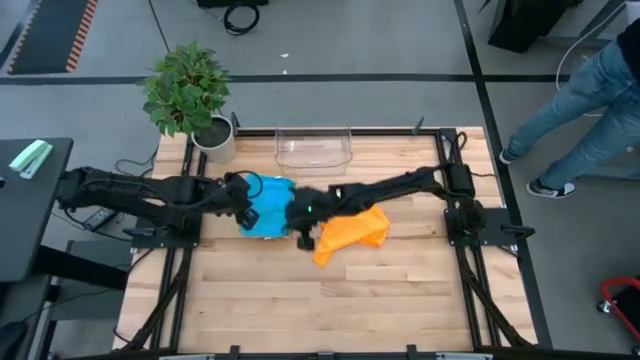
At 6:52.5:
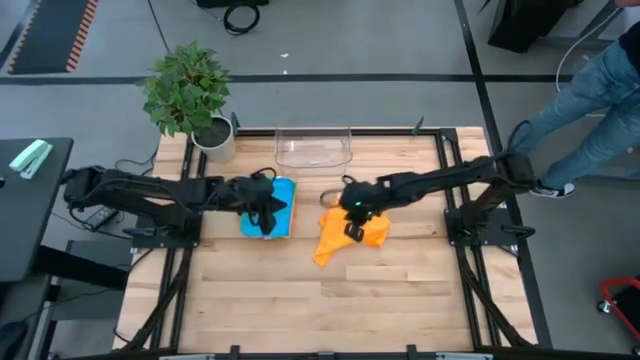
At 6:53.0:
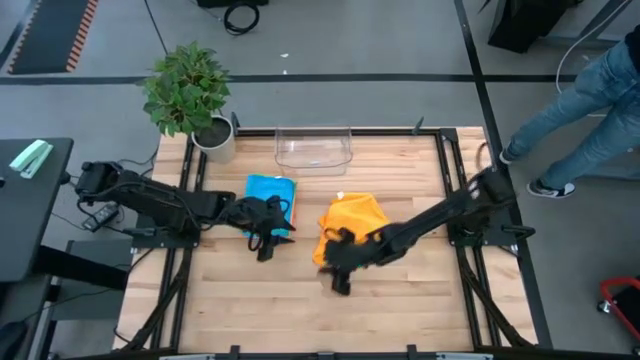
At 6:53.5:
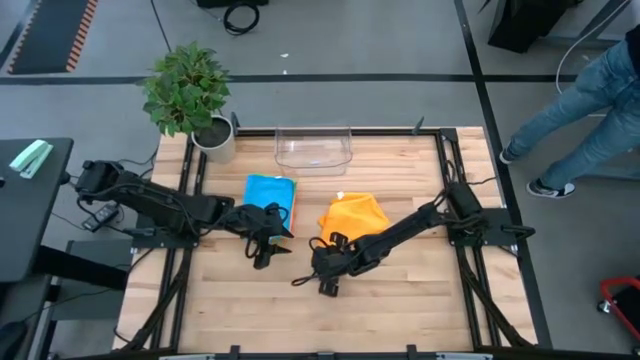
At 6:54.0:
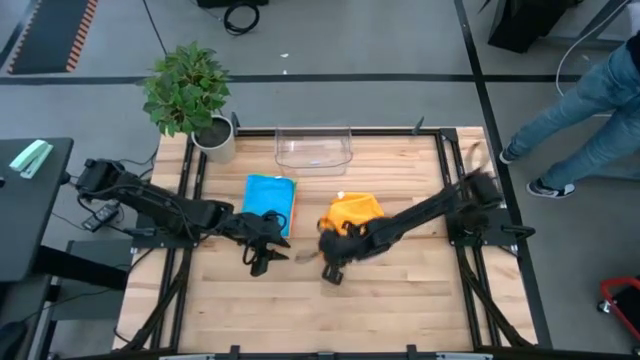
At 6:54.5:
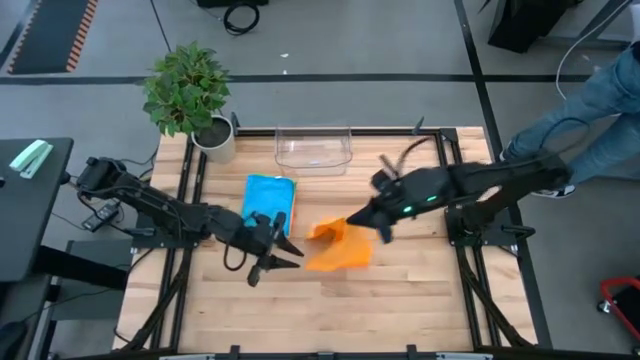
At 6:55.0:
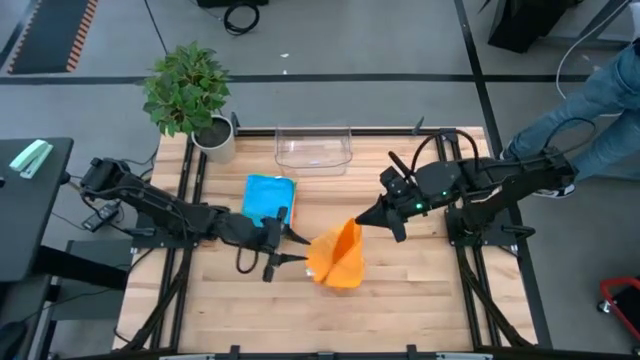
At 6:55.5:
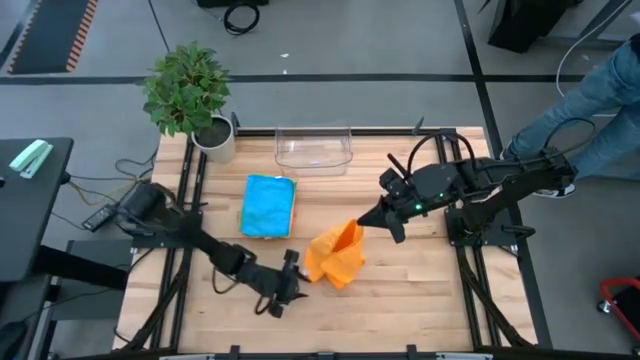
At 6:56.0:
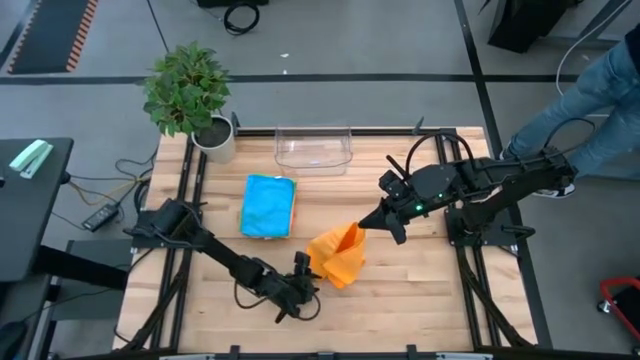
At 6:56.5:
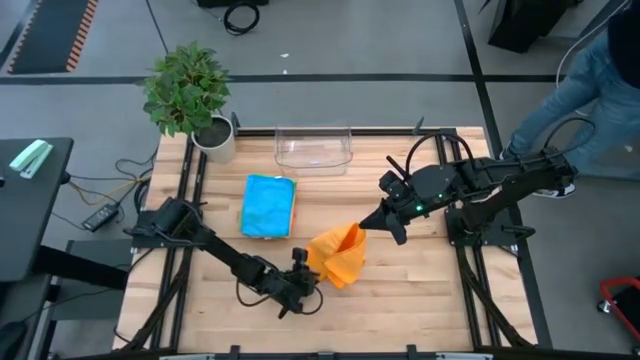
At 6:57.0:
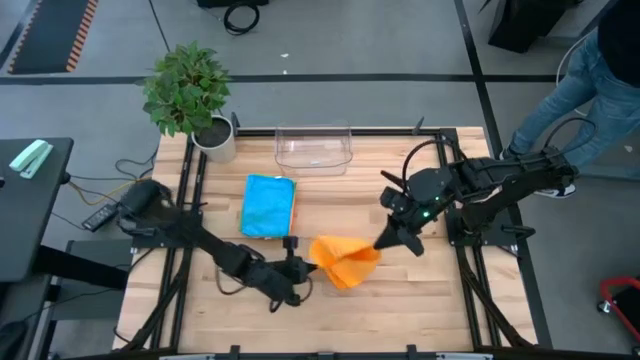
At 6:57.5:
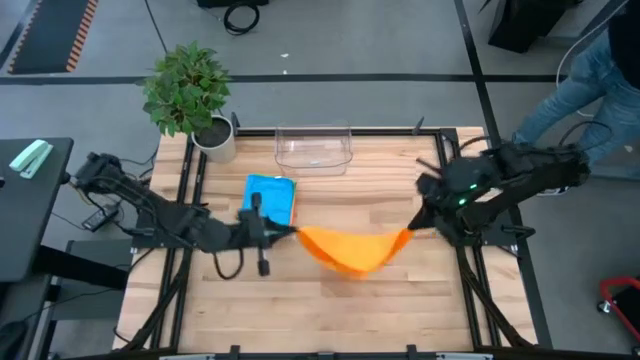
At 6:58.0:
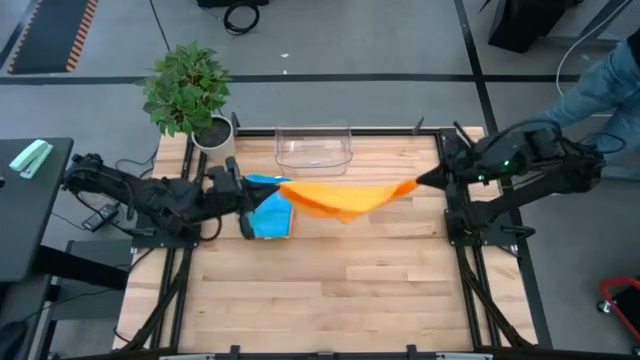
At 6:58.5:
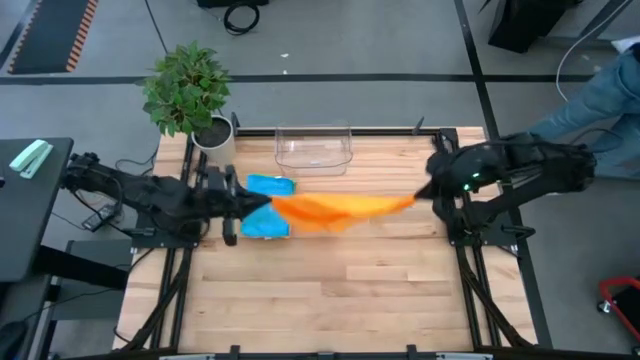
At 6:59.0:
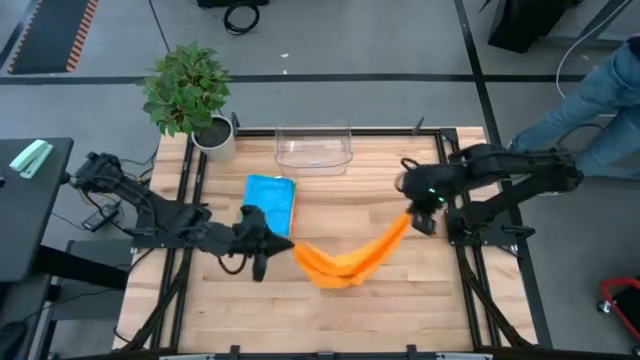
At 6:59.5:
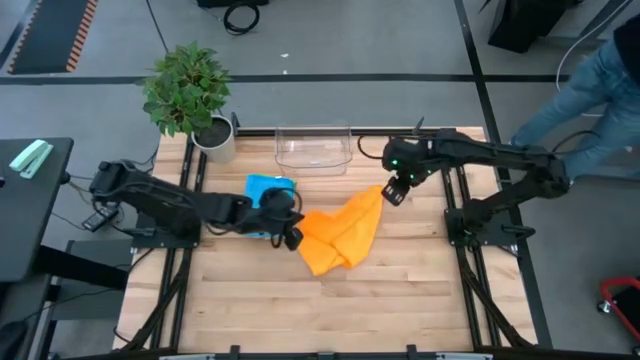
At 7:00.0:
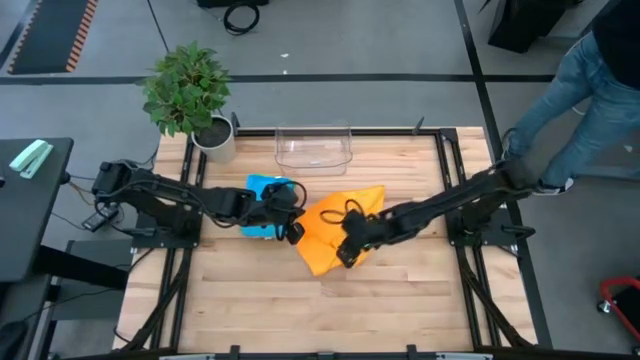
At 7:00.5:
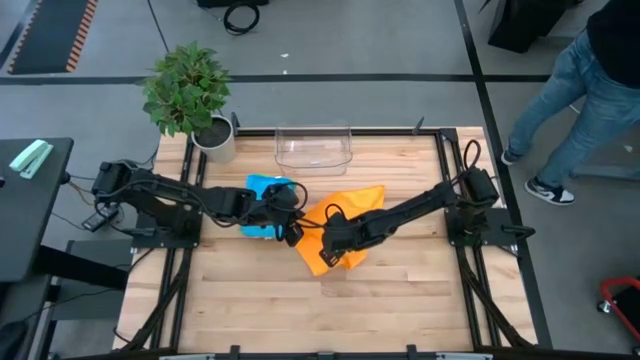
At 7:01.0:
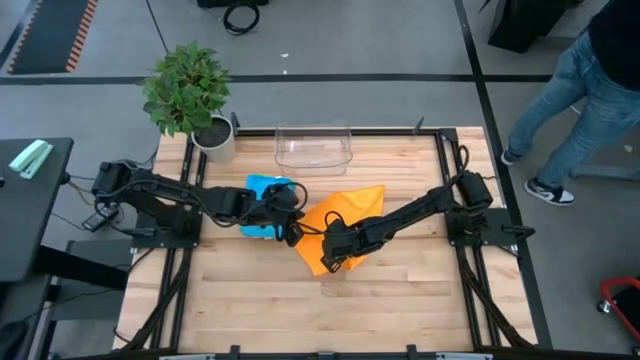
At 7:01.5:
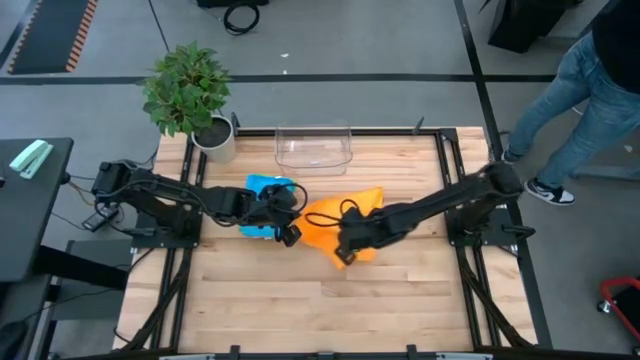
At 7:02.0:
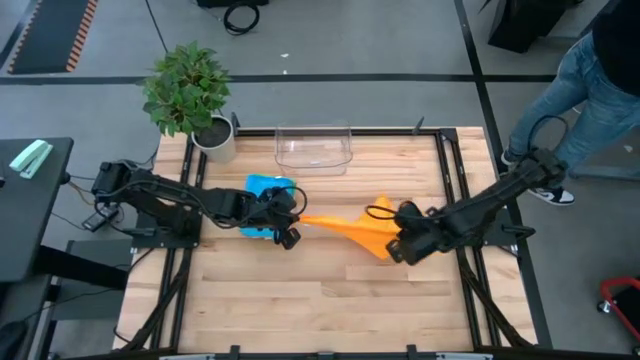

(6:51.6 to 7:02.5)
Task: Fold microfiber towels
Fold the orange microfiber cloth

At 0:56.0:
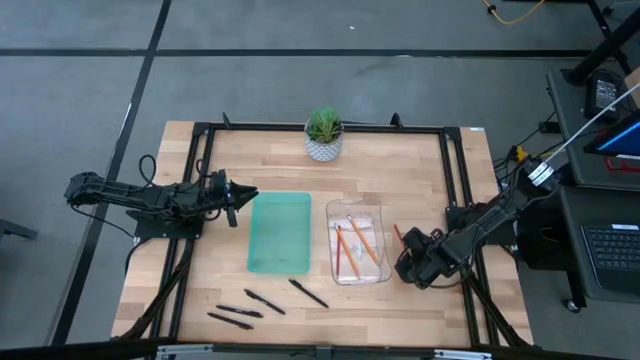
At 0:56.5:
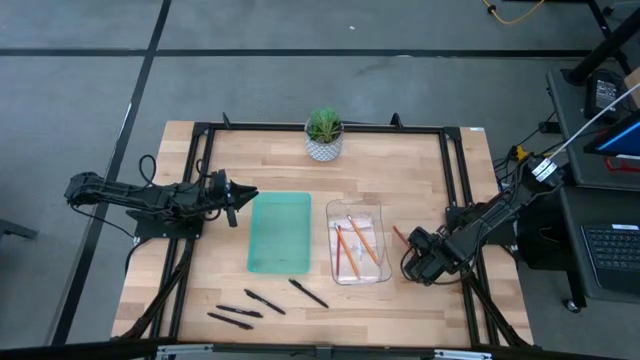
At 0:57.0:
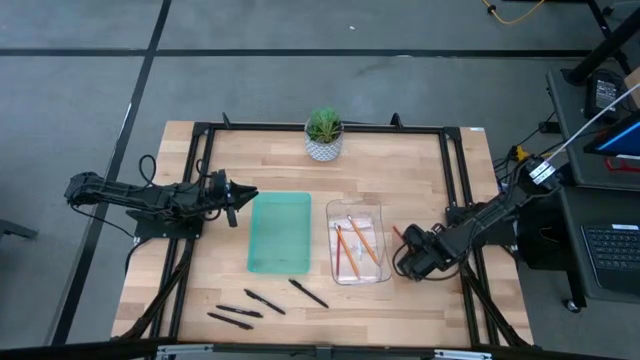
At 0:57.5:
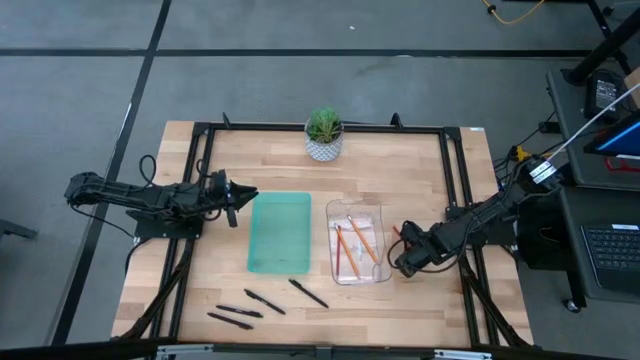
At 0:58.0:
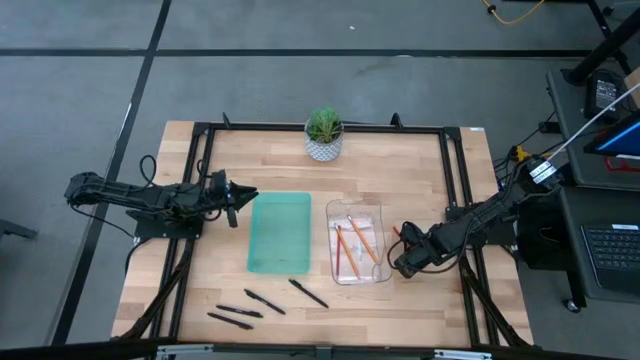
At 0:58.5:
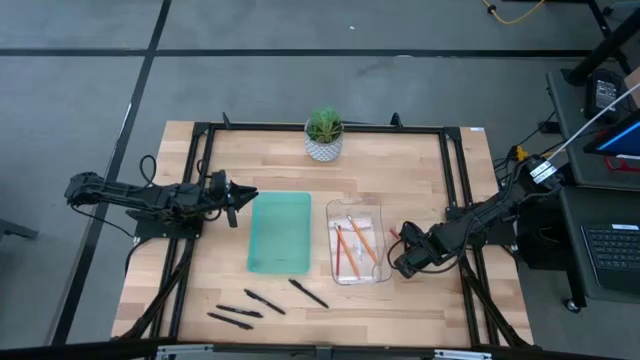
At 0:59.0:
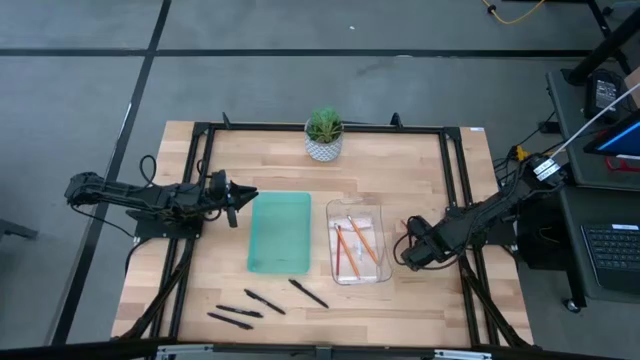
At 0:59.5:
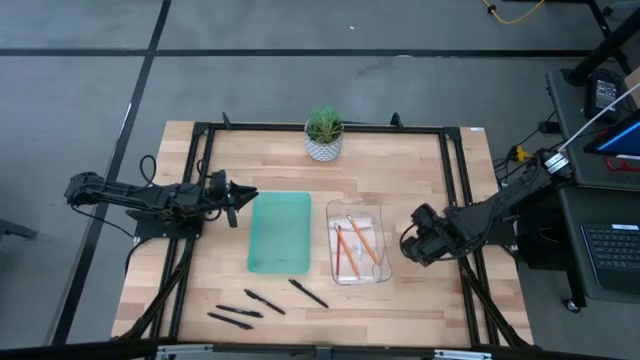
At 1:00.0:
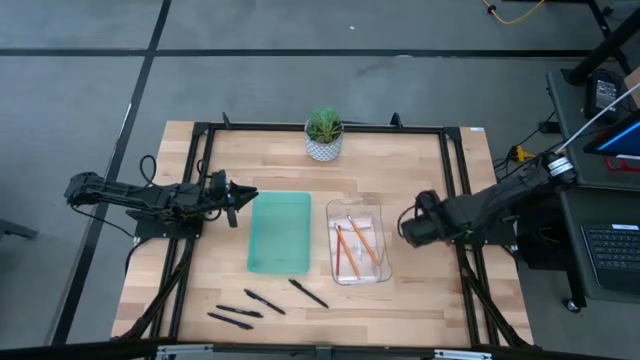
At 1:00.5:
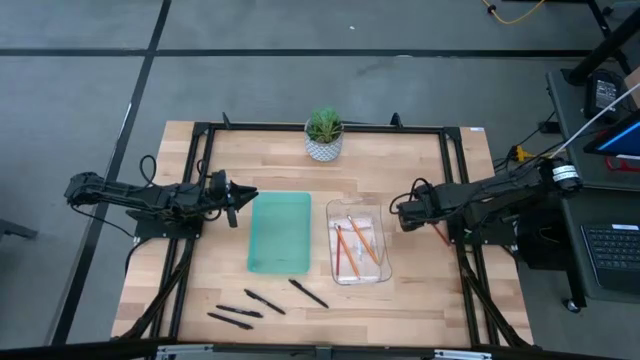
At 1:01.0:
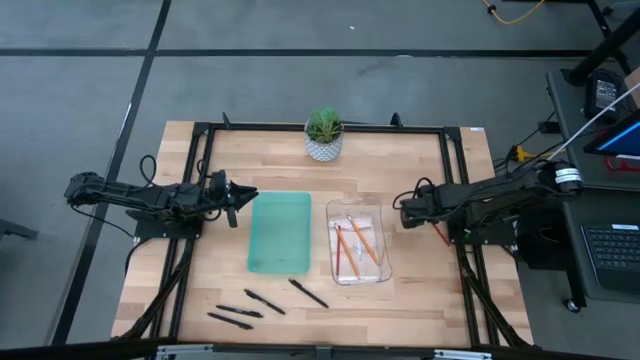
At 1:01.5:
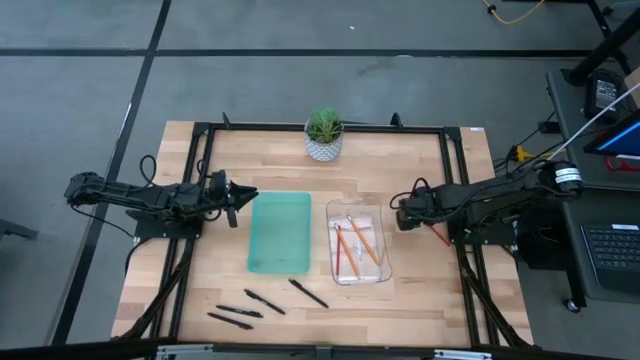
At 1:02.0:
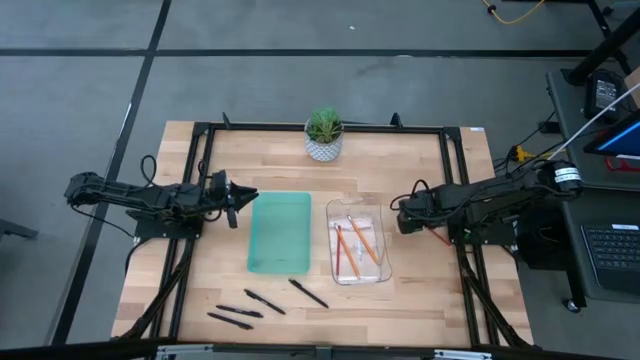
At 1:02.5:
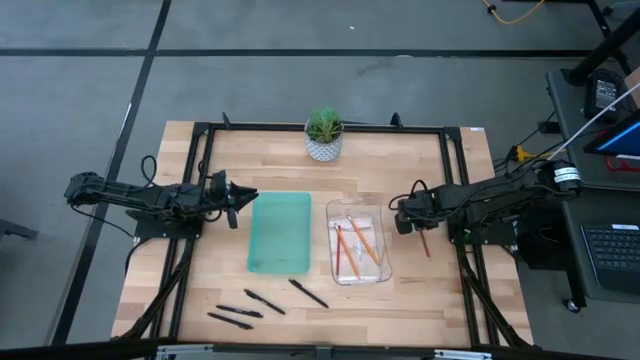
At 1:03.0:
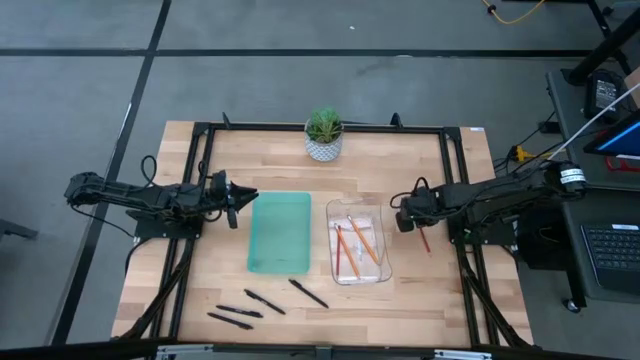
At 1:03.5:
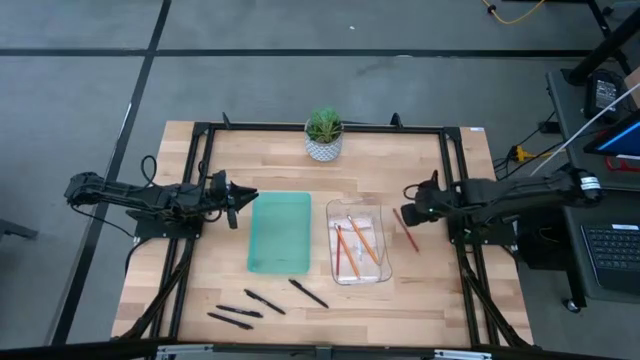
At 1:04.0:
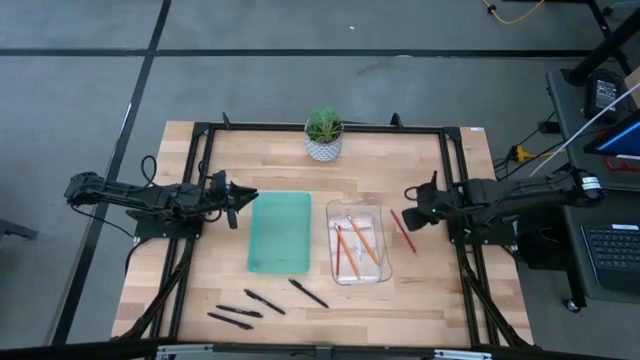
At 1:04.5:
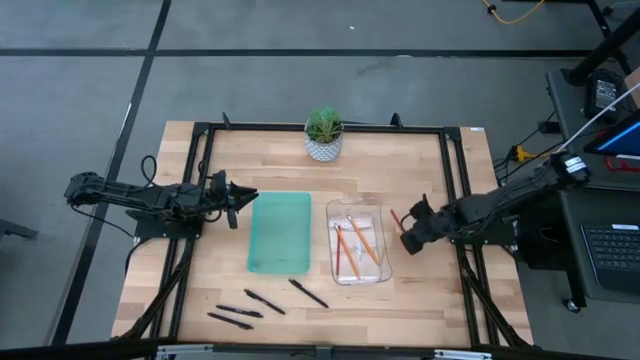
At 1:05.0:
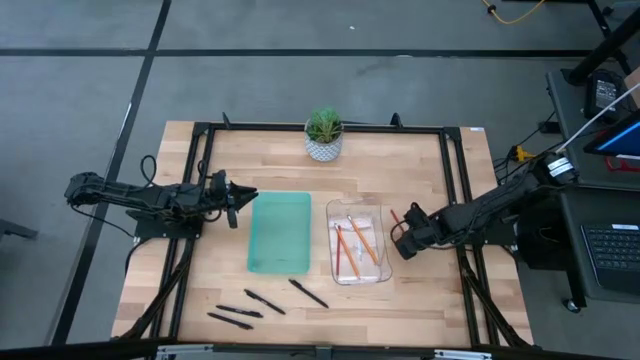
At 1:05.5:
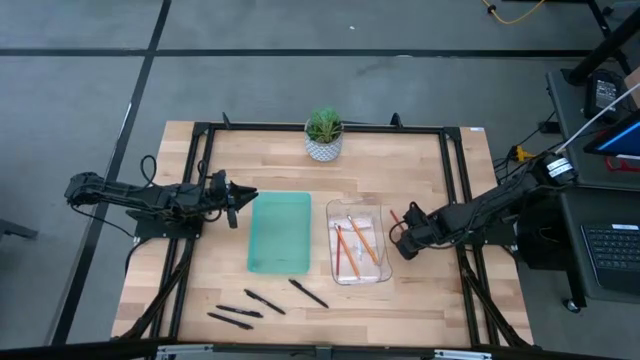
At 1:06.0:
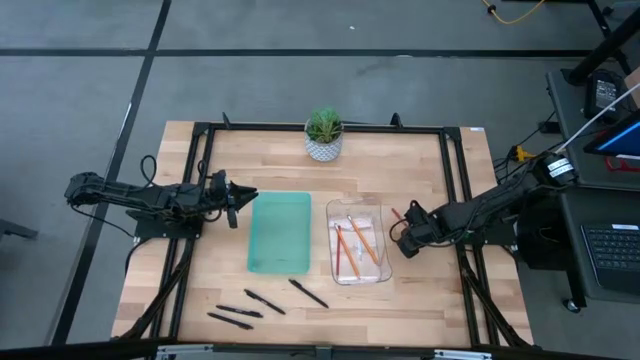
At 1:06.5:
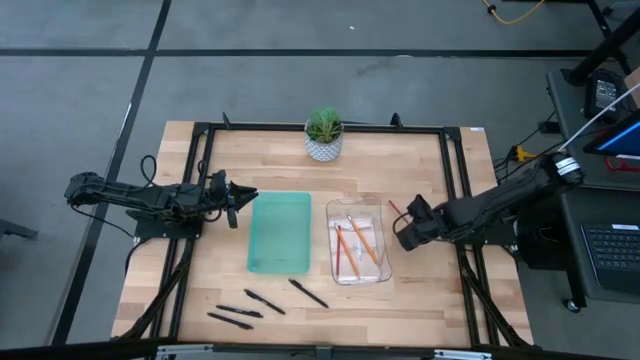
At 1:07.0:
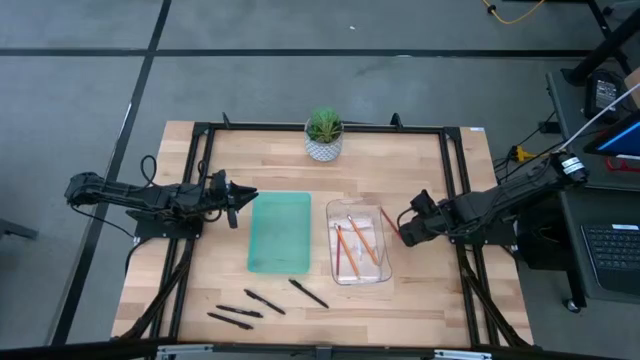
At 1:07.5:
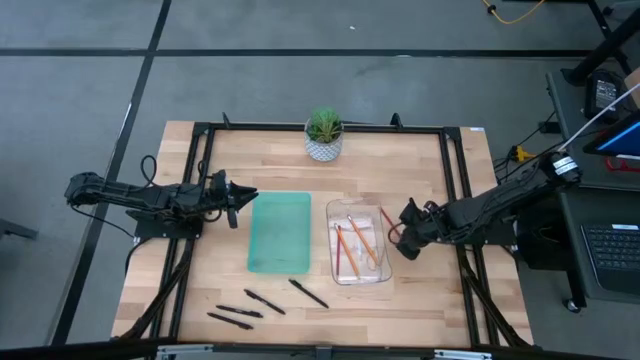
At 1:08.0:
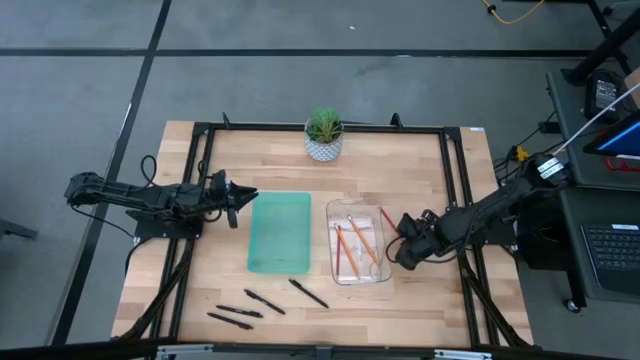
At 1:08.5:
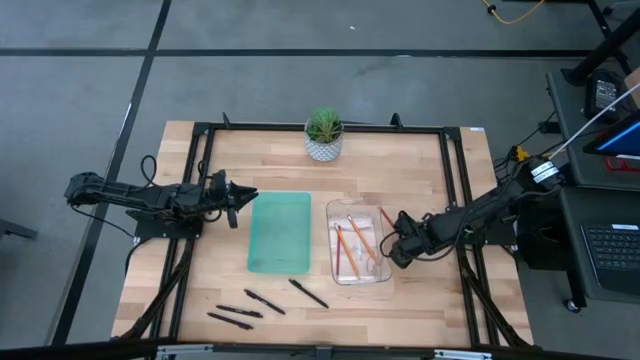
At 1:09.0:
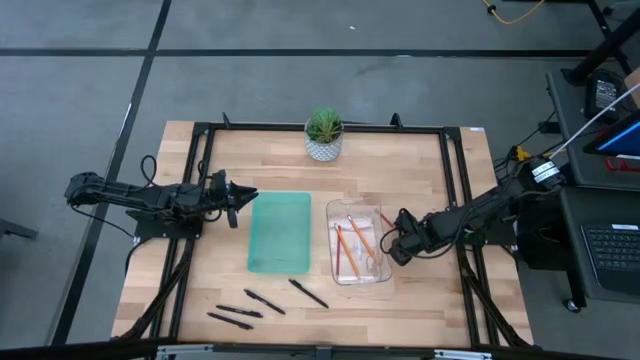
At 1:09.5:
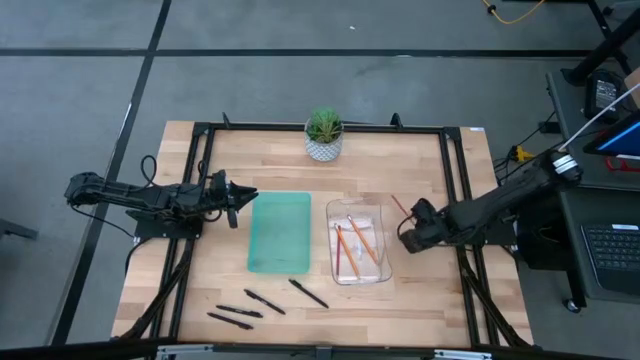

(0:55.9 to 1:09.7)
Task: Sort pens & pencils
Put the red pencil into the transparent bin
